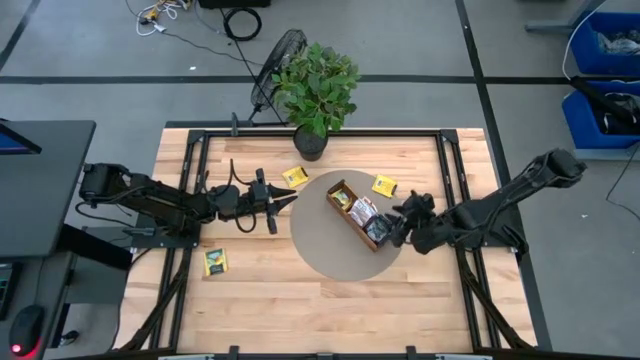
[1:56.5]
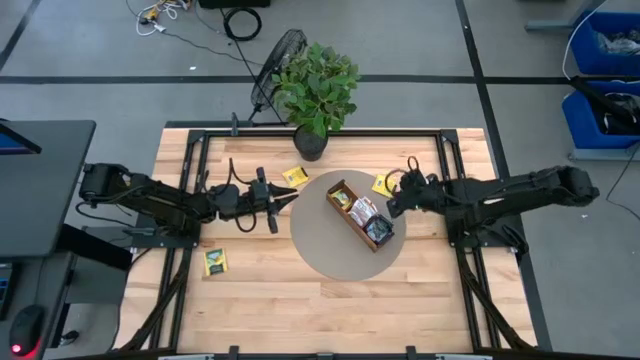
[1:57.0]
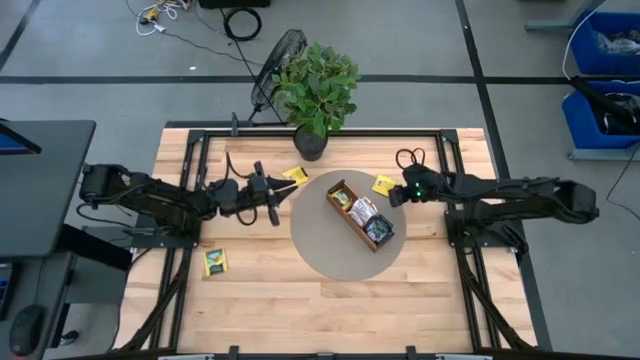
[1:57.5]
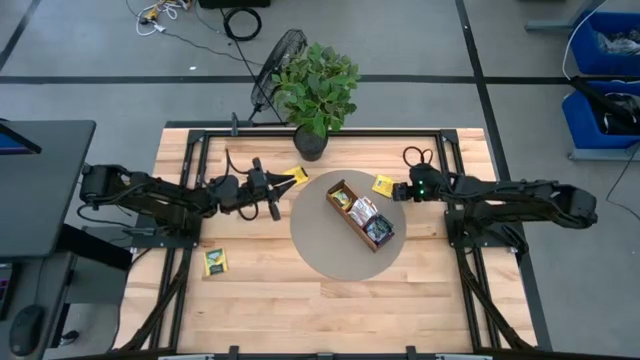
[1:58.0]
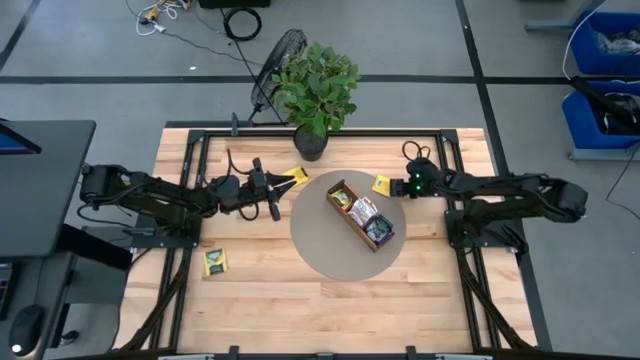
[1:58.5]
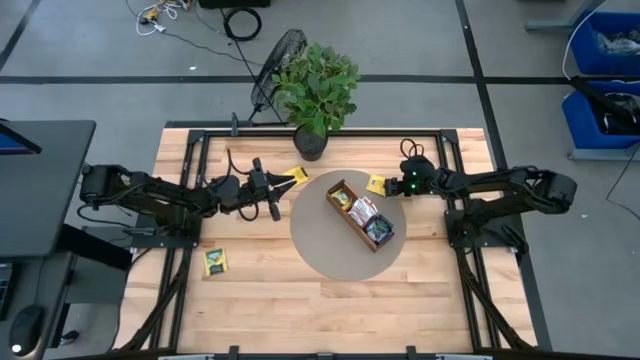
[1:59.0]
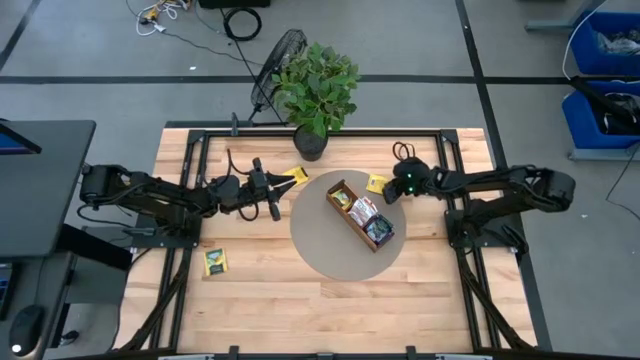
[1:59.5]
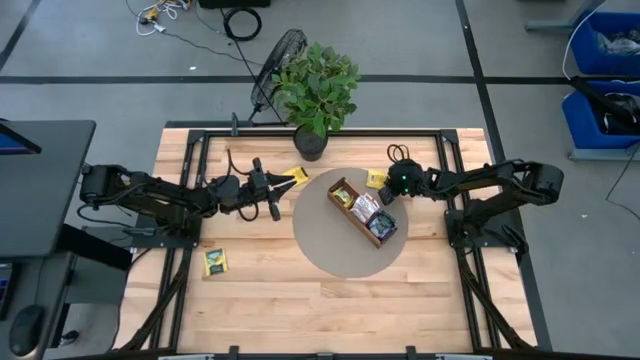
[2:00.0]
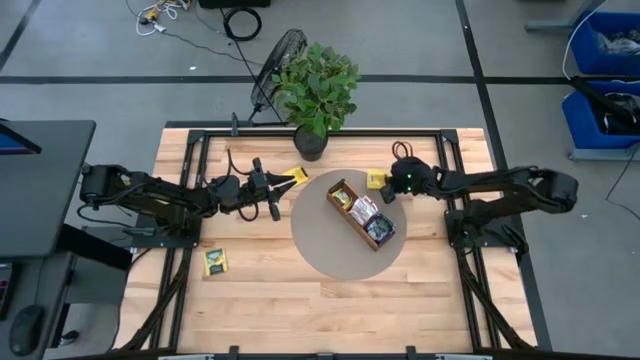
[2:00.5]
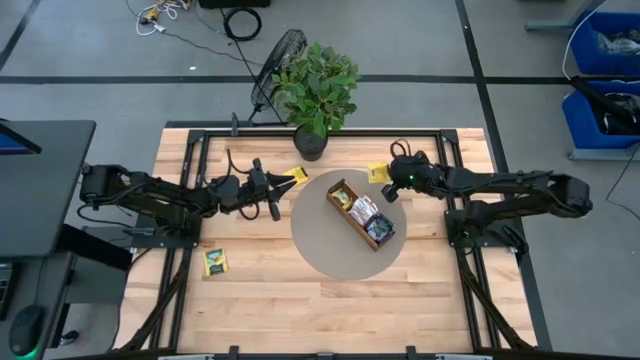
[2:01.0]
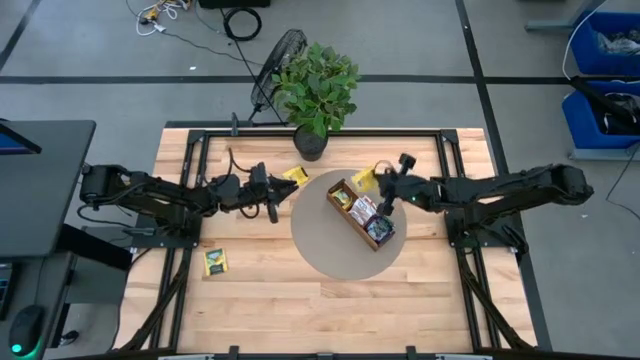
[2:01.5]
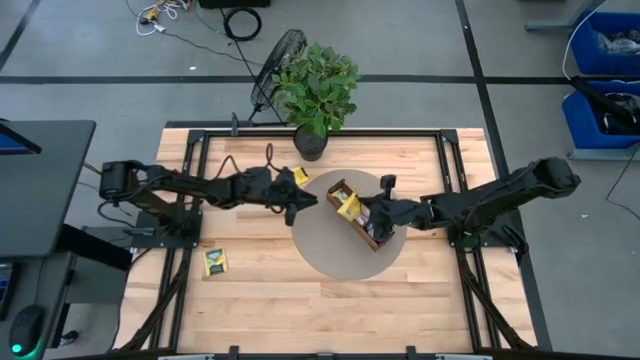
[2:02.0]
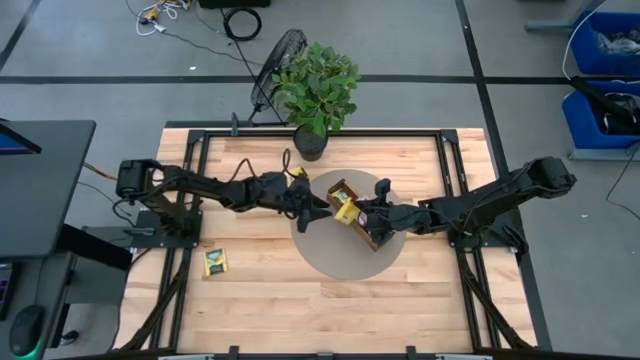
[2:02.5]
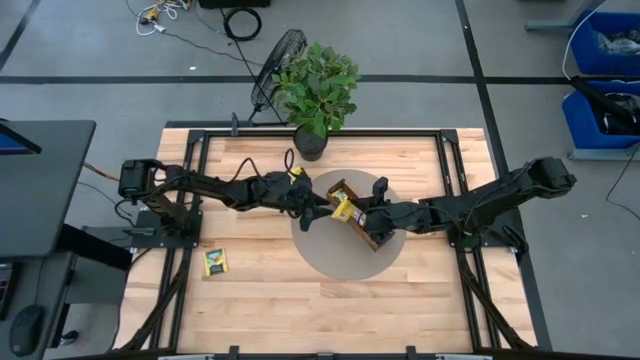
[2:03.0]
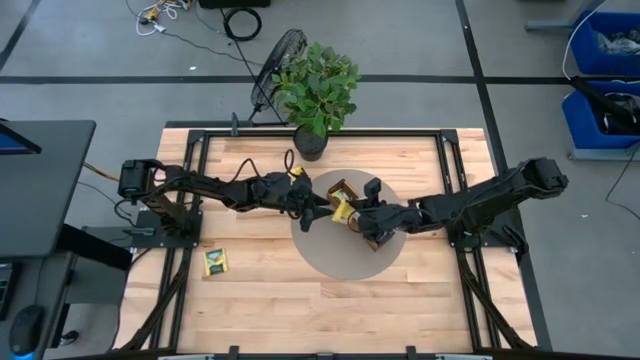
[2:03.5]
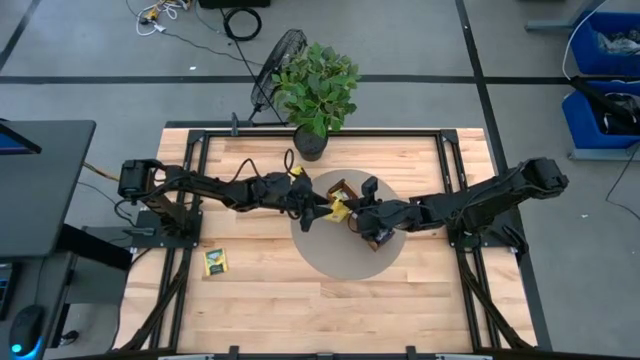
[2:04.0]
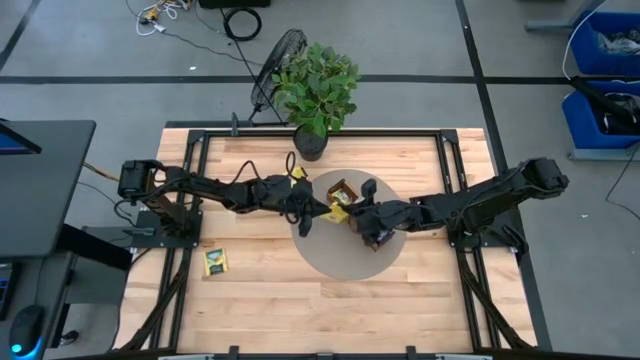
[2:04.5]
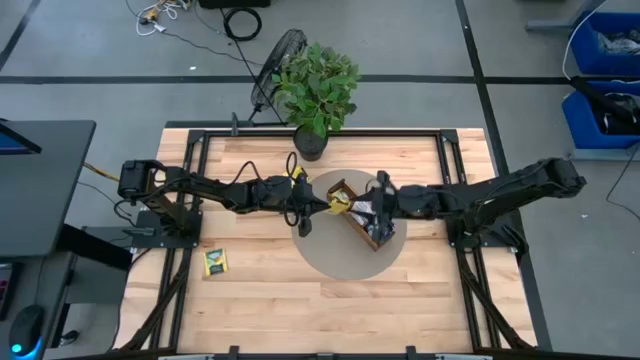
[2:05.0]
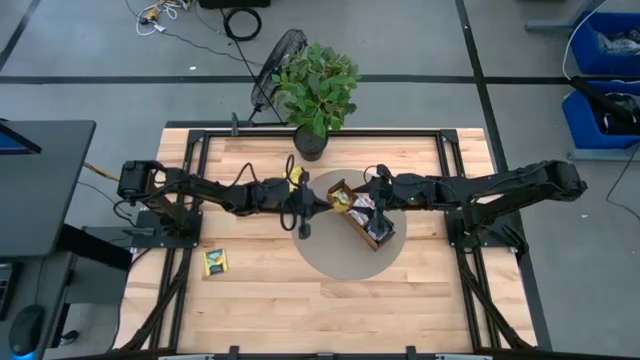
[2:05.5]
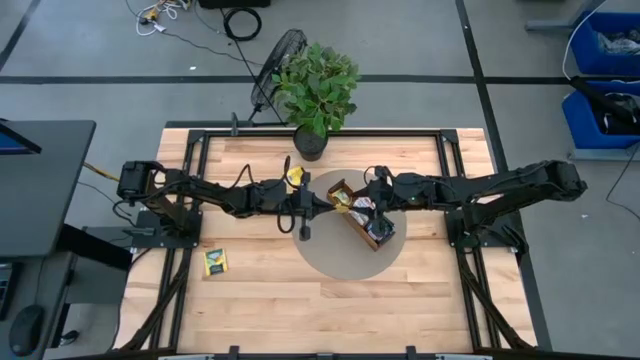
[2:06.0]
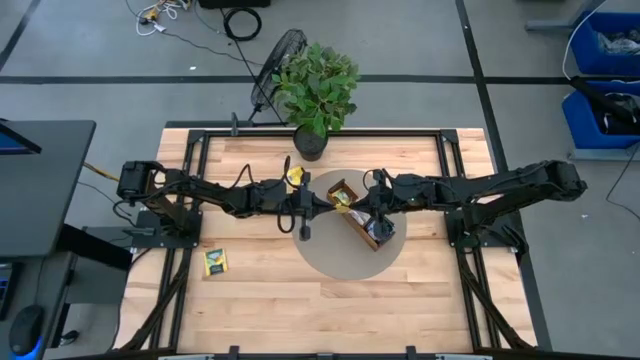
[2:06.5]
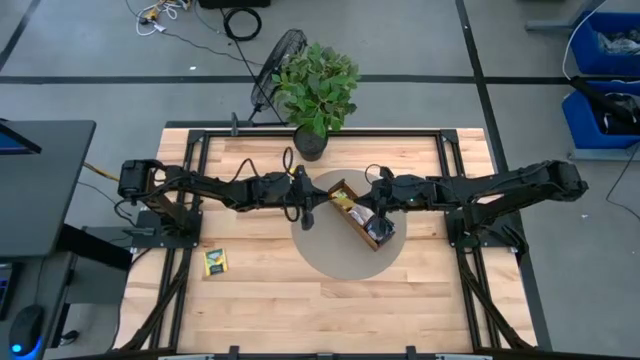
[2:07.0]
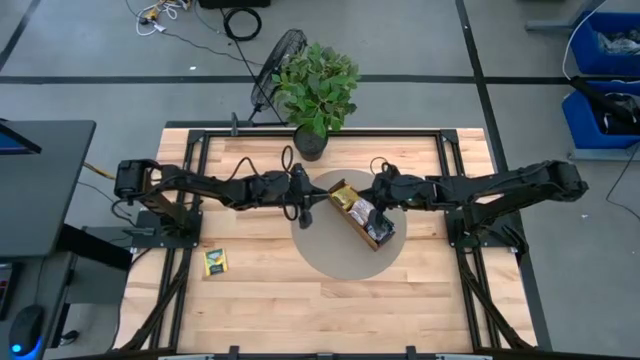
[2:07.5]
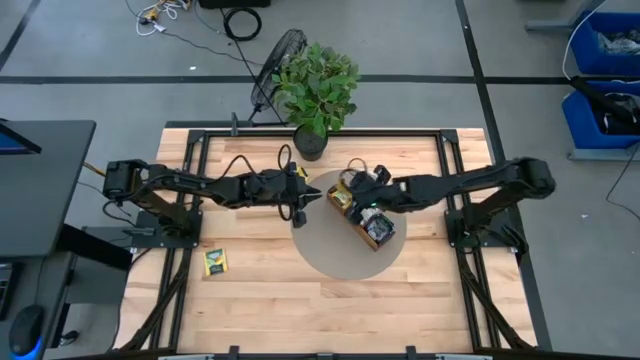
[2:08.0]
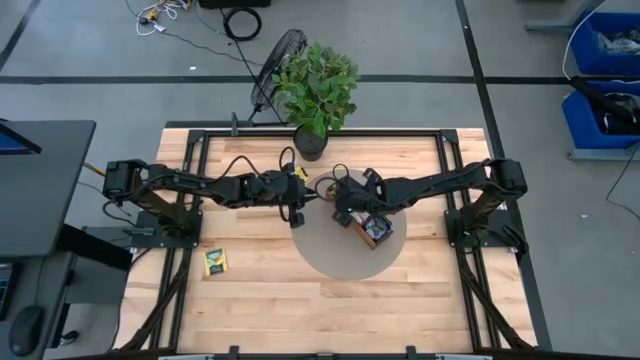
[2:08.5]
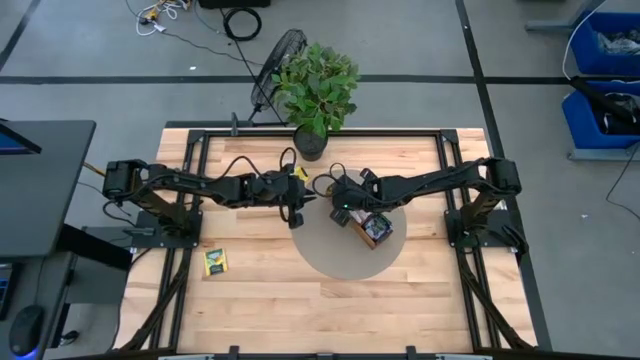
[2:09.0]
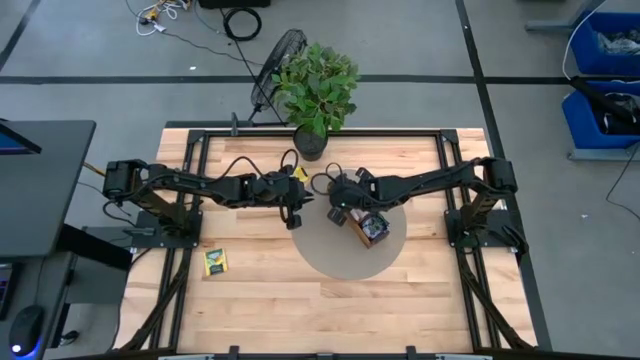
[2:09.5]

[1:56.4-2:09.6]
Task: Pick & Place Tea
Put the yellow tea bag into the left section of the wooden organizer

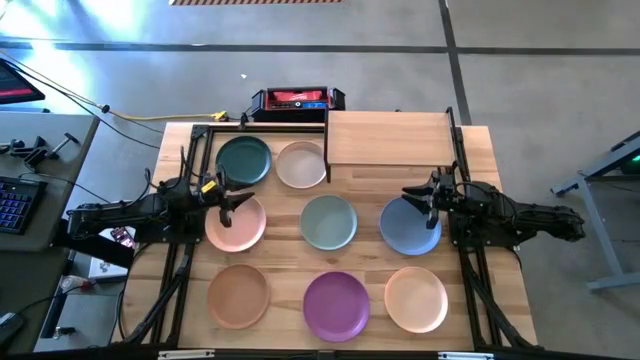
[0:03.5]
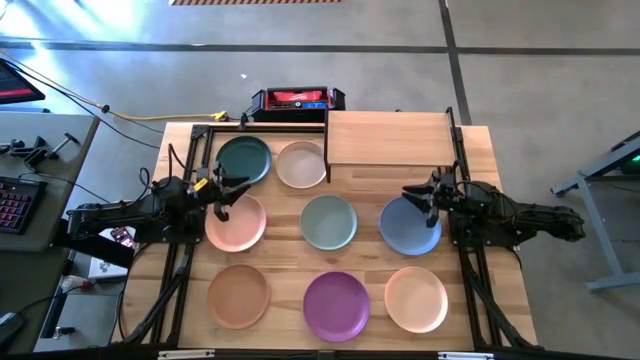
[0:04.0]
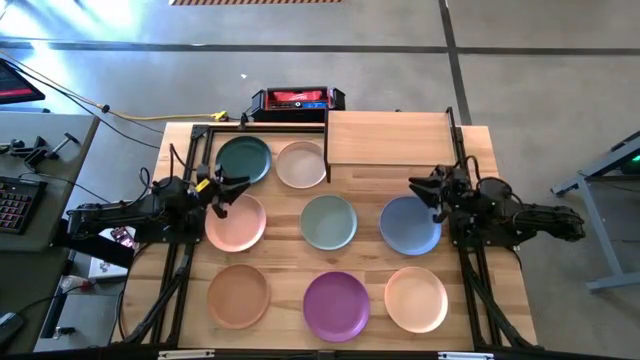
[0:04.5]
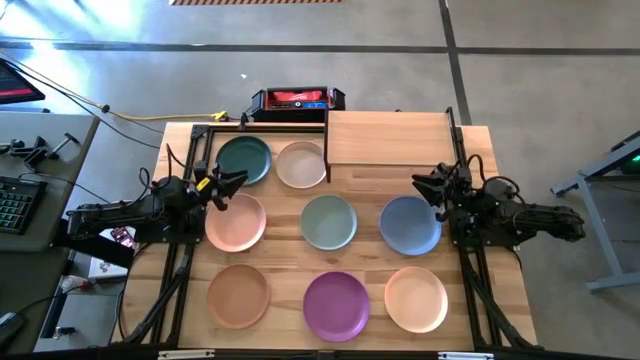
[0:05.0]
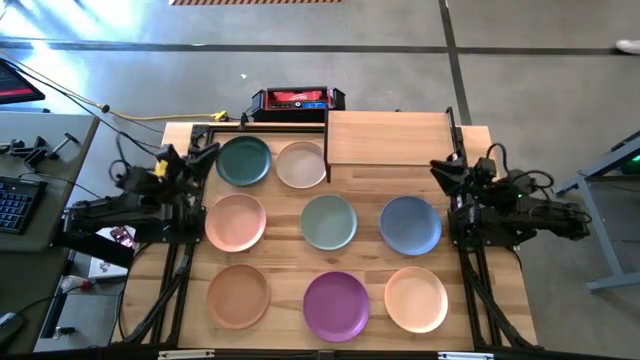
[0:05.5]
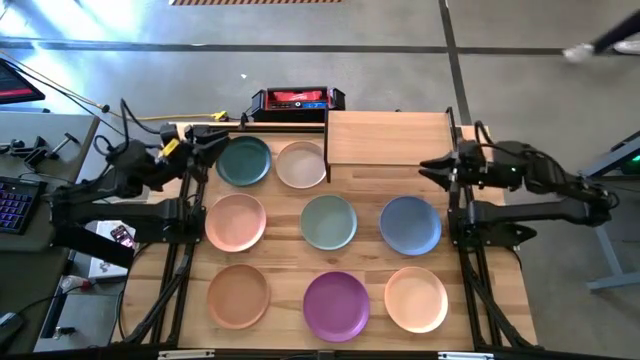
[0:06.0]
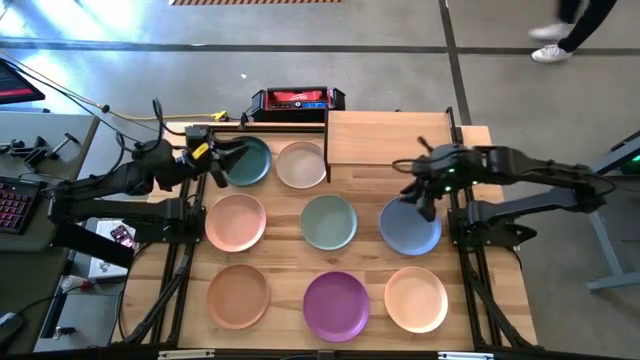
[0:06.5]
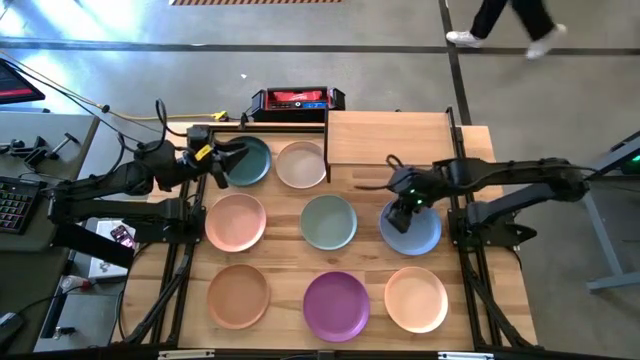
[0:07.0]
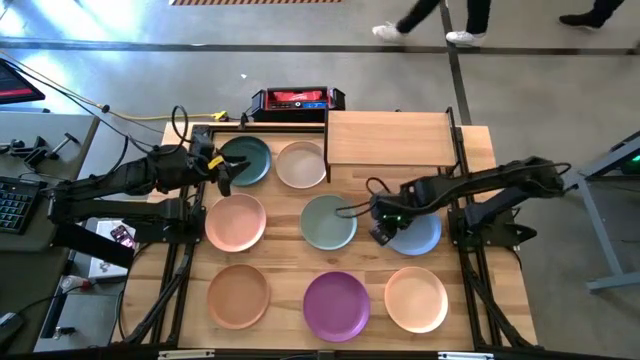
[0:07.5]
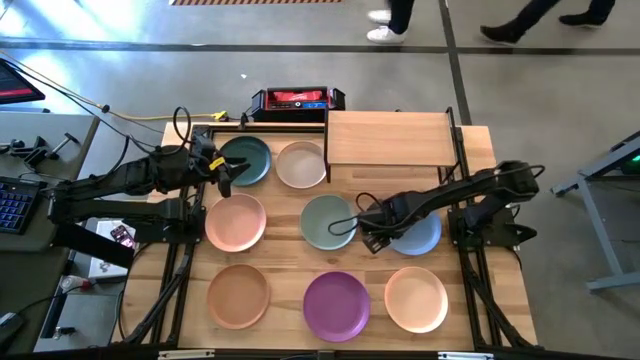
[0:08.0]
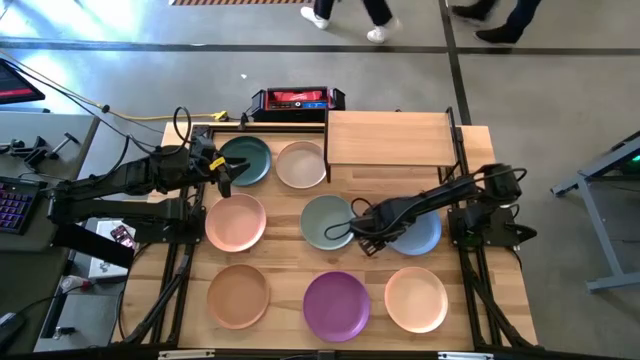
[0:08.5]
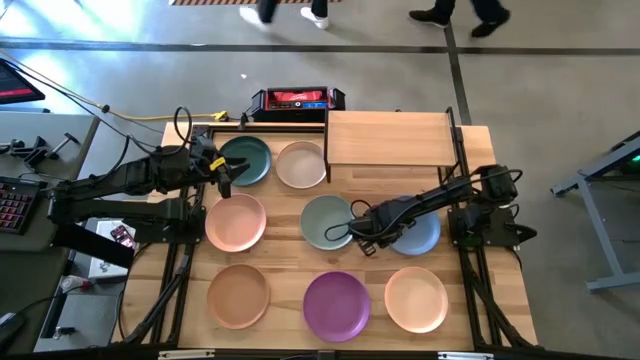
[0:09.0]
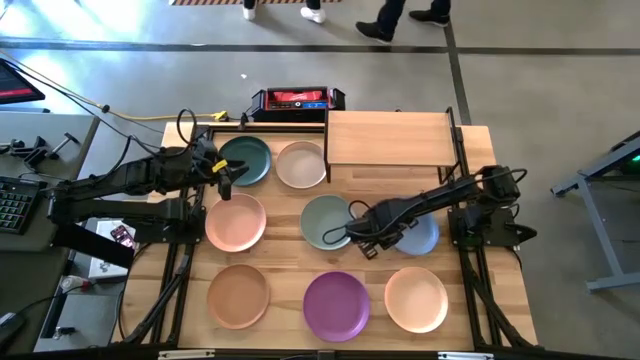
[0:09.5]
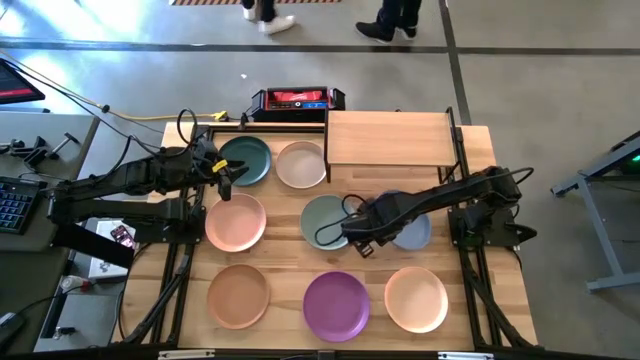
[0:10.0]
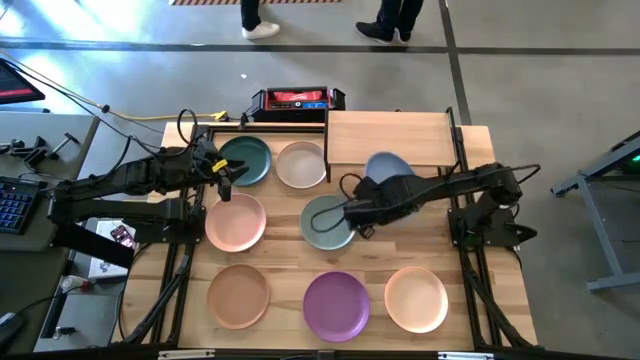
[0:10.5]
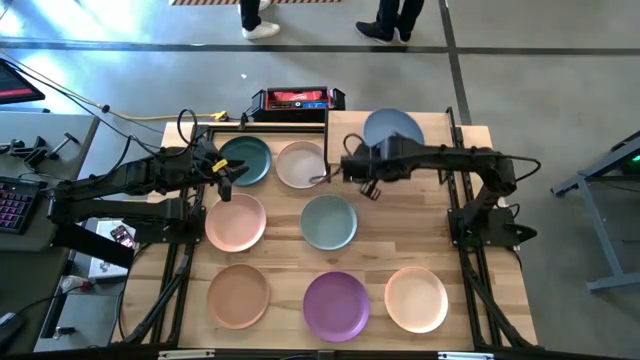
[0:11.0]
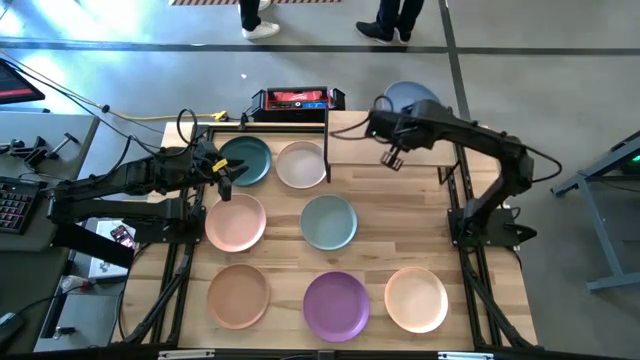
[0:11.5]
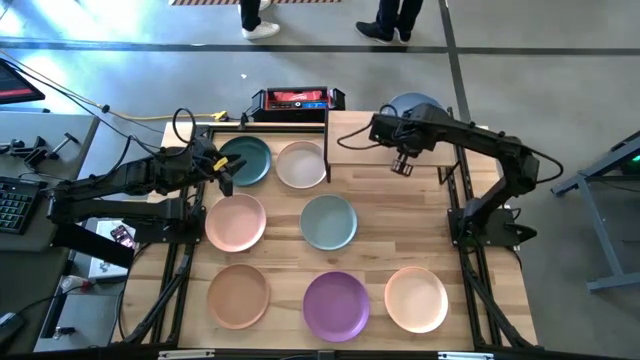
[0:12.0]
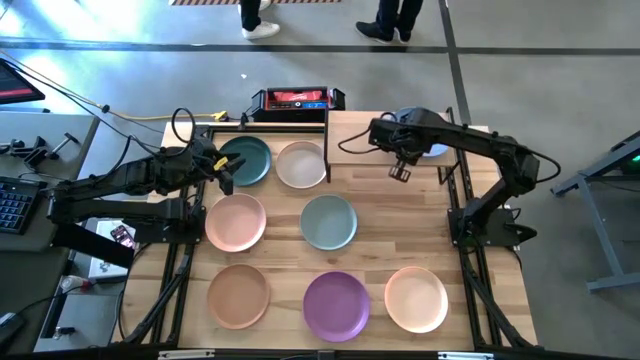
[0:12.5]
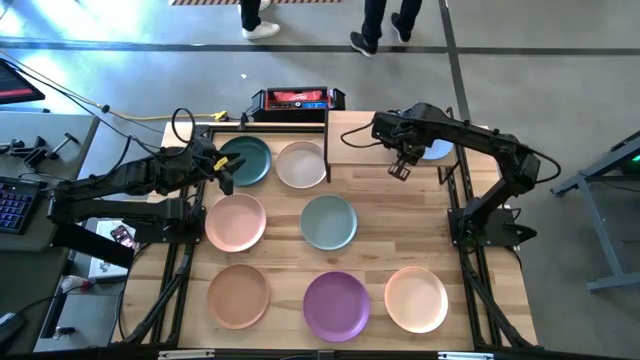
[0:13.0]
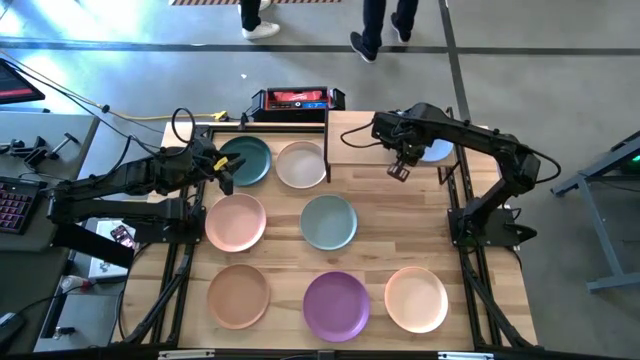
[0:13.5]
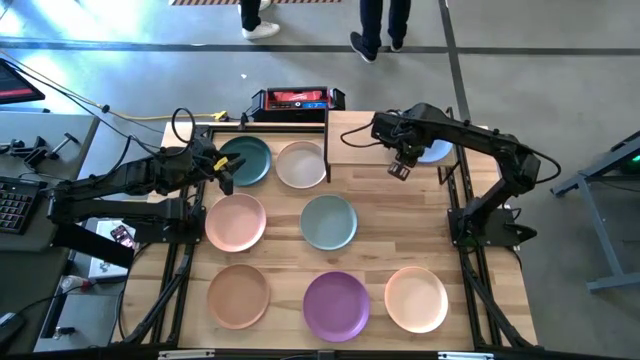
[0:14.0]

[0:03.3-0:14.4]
Task: Place and stack plates onto a shelf
Put the blue plate on the shelf
